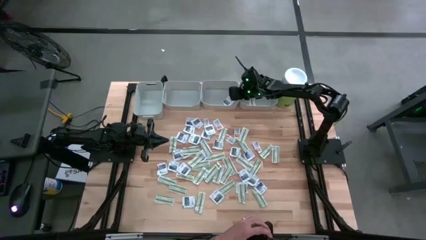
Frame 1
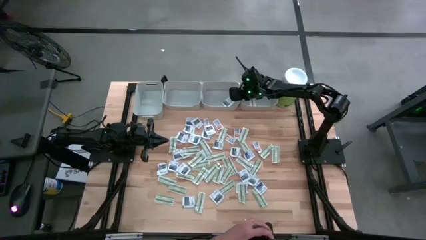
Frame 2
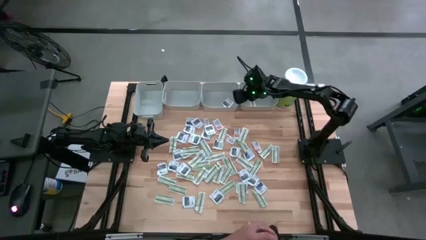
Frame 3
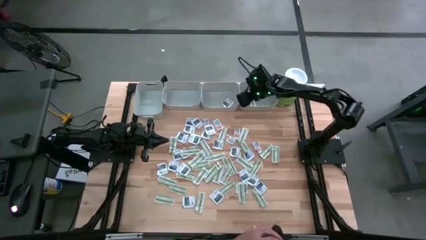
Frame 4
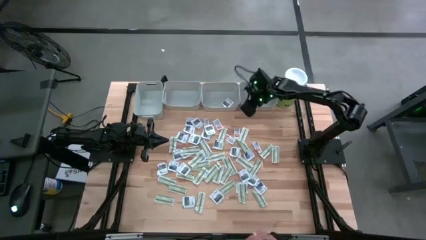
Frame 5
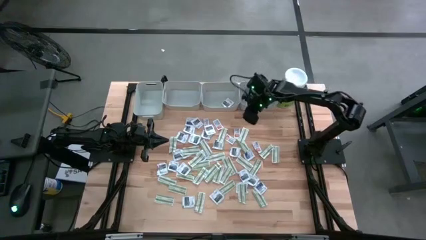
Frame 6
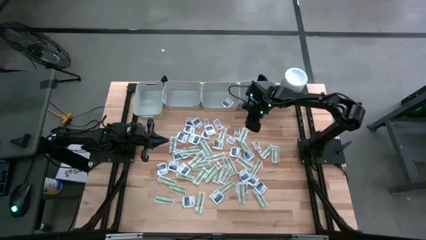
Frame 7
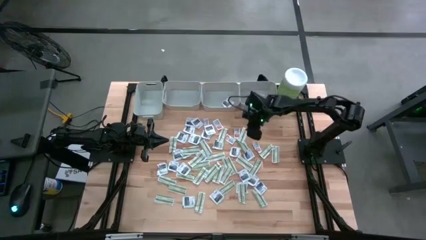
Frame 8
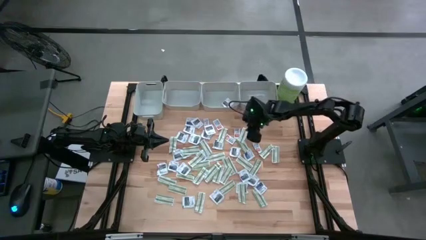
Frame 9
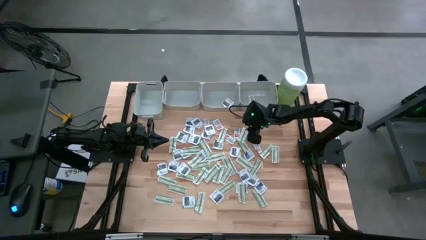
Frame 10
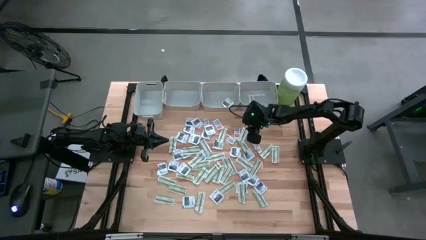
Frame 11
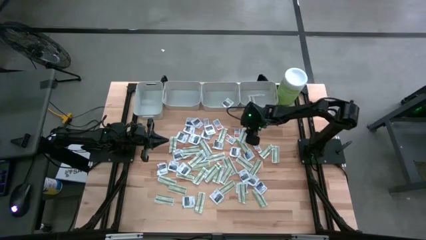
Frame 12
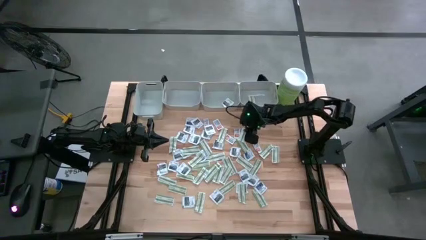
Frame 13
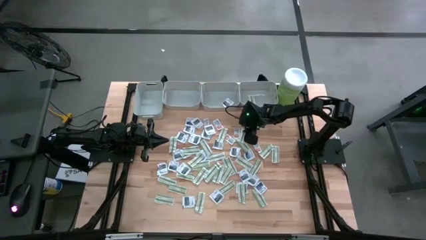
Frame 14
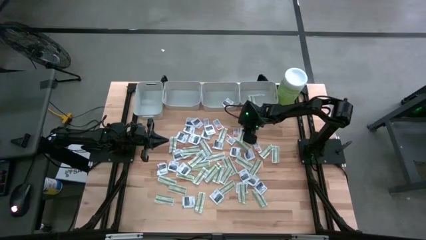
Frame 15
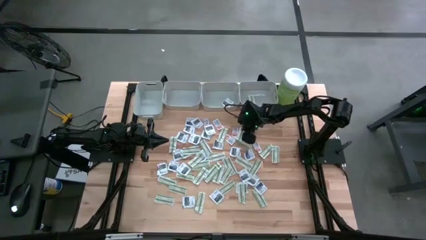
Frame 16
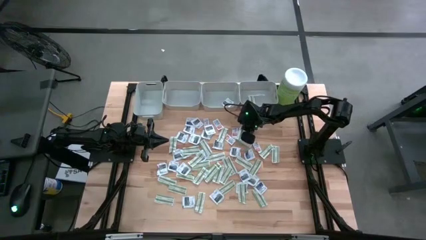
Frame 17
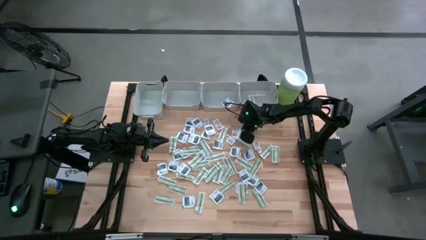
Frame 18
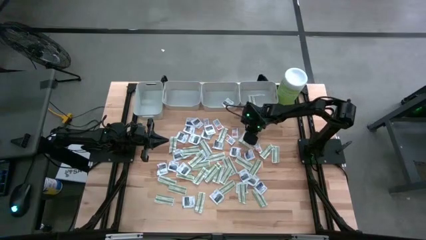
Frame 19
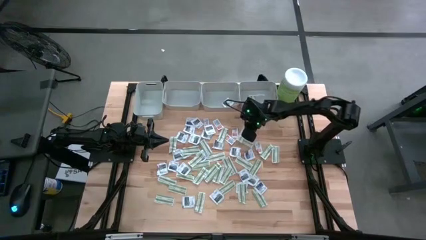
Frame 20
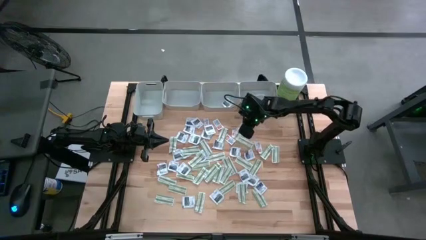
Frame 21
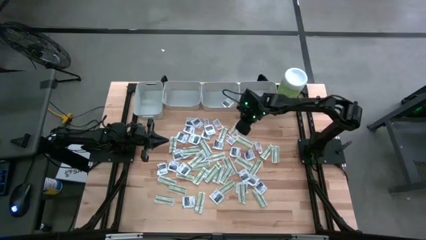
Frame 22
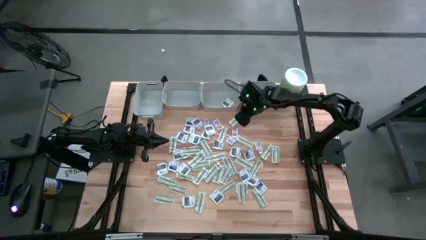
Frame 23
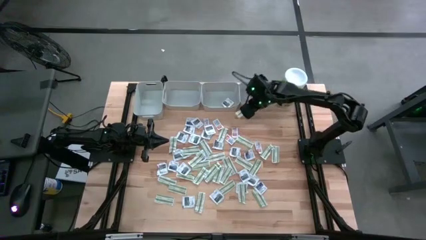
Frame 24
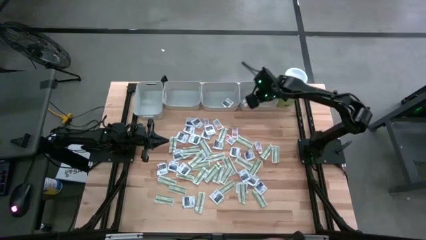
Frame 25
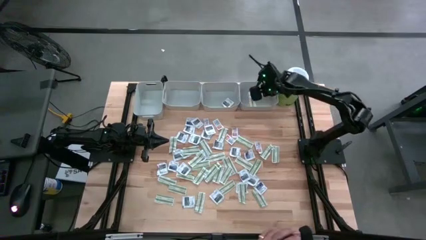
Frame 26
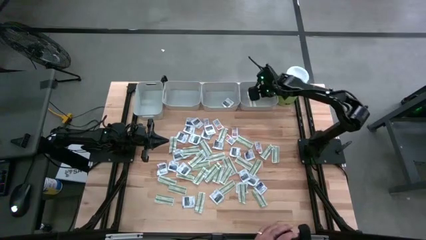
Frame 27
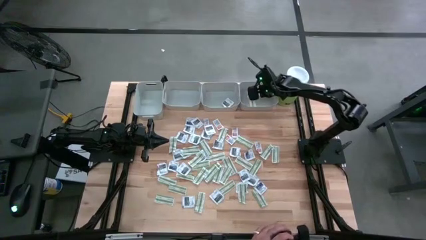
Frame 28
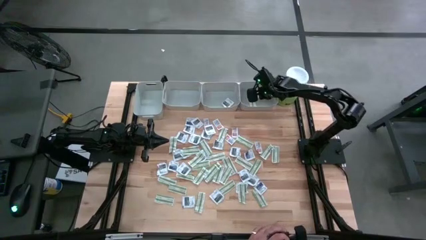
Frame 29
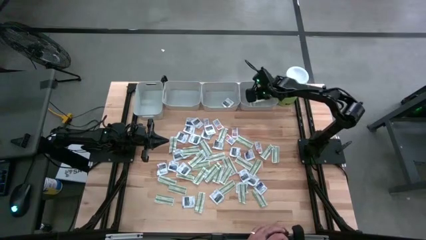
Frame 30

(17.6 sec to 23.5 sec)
Task: Pick & Place First Aid Supplies
Put the green bandage into the right gray bin

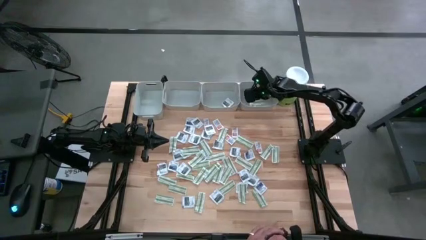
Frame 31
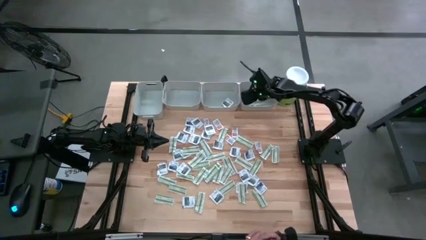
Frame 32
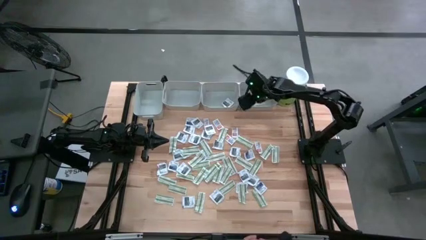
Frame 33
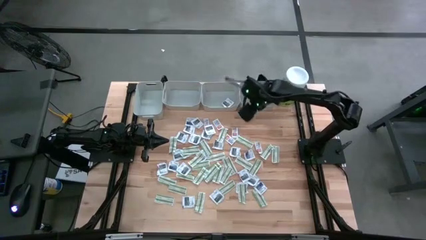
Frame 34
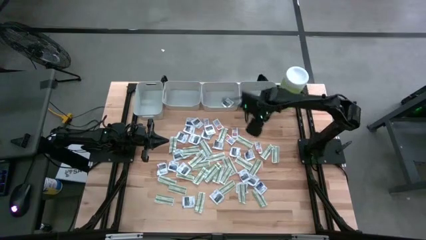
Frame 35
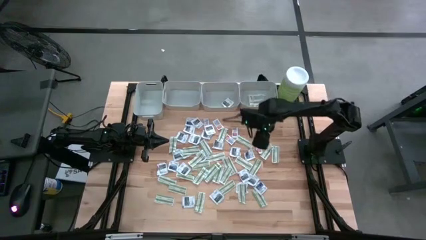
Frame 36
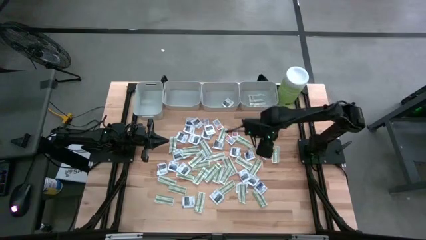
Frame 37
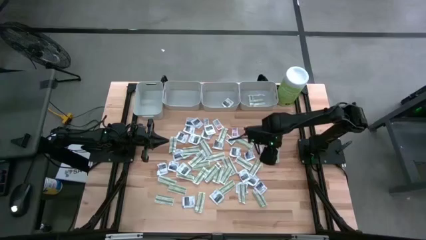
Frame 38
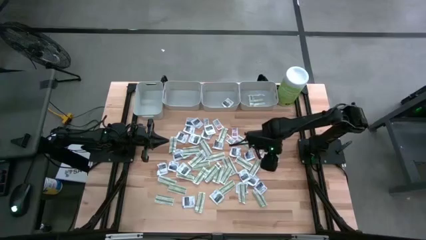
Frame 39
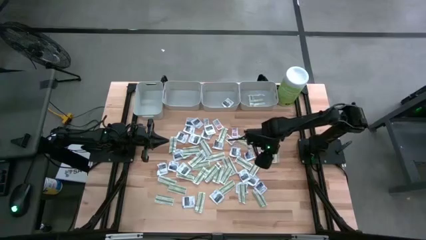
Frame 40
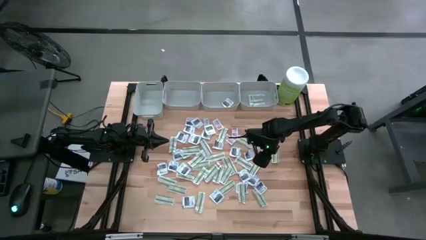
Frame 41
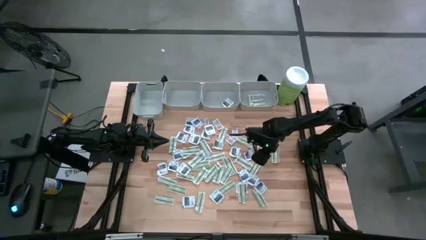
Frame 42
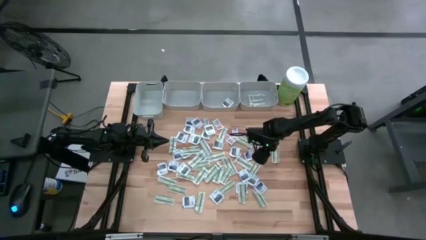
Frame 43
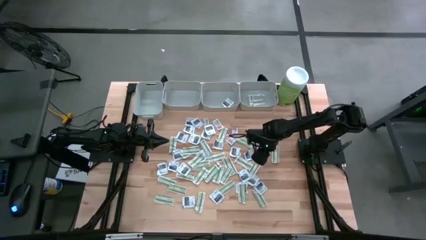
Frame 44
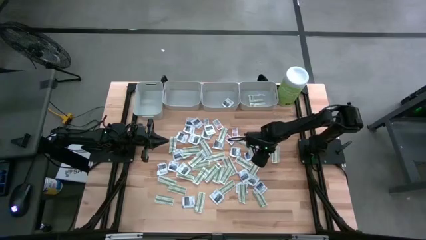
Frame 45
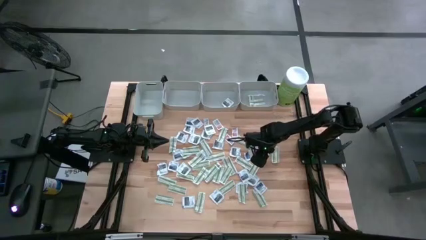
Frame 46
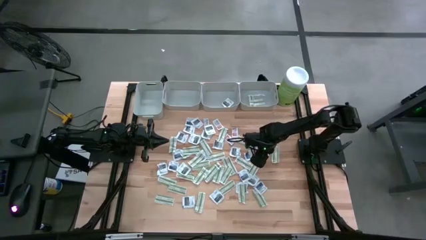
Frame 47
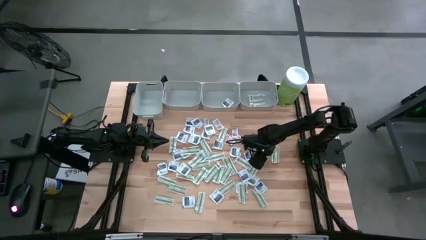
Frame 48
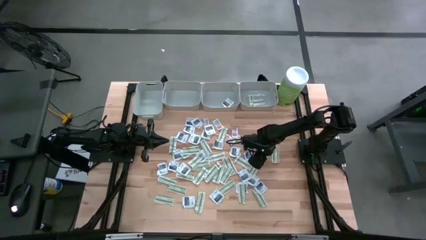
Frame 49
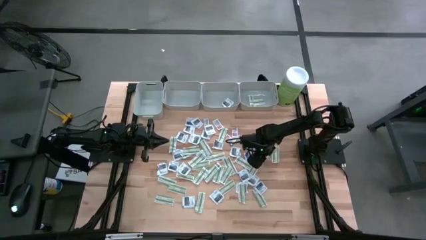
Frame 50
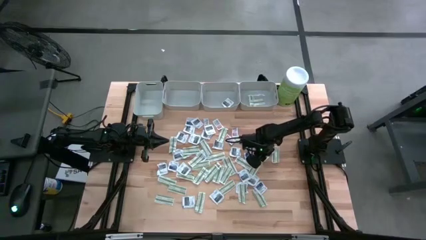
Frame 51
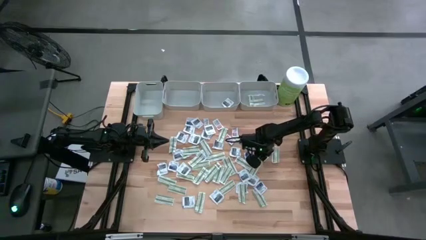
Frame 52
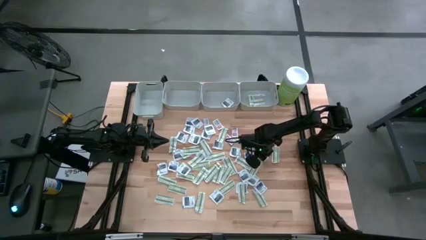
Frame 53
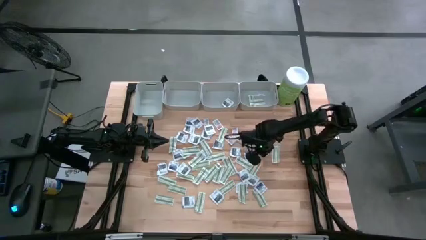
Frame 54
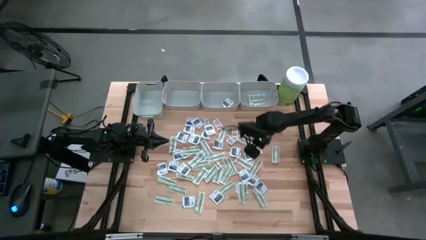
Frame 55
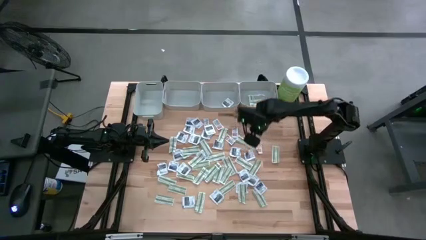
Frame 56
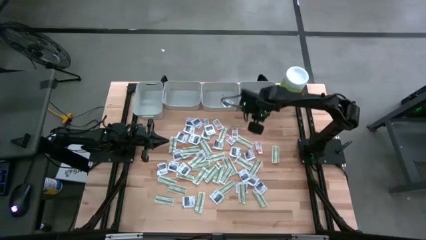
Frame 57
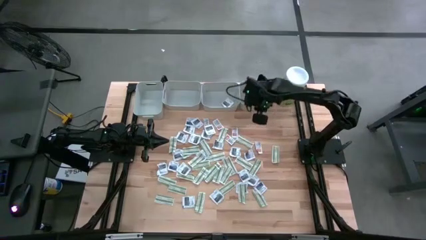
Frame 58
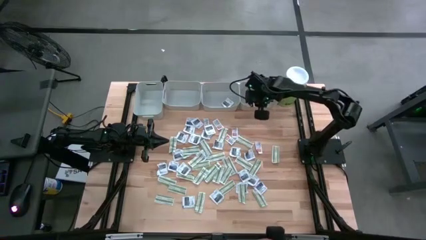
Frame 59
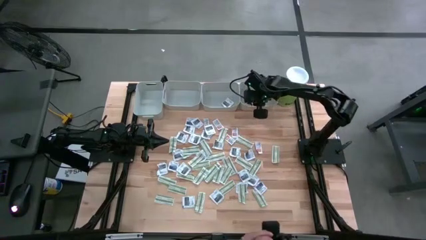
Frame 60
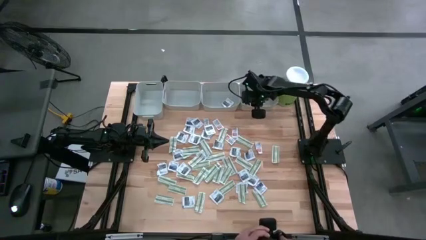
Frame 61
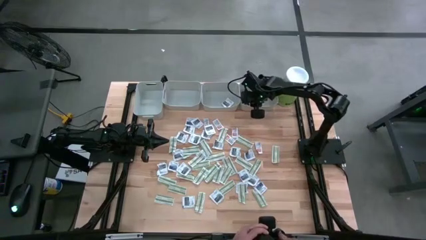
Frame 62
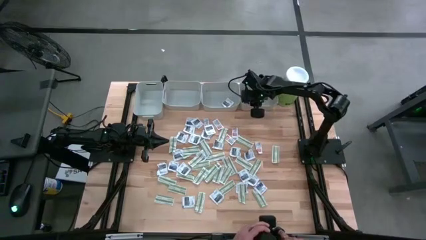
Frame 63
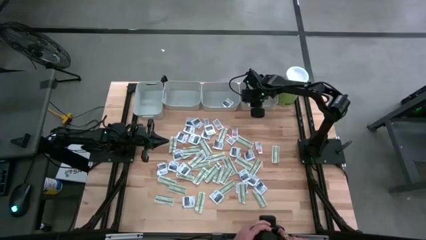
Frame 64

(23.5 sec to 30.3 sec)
Put the green bandage into the right gray bin

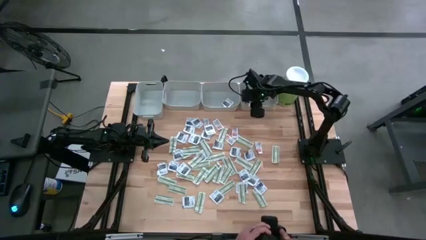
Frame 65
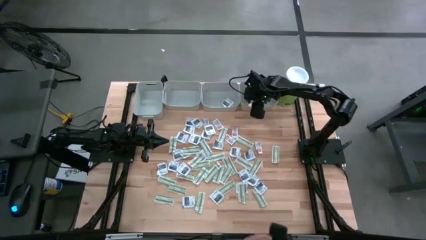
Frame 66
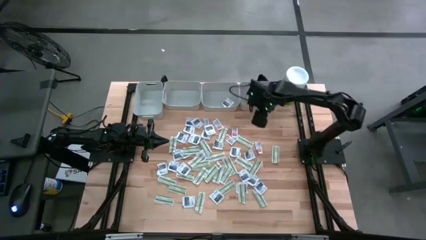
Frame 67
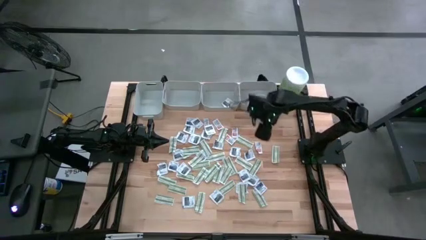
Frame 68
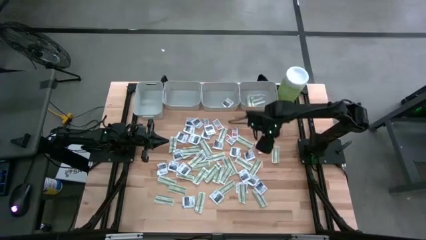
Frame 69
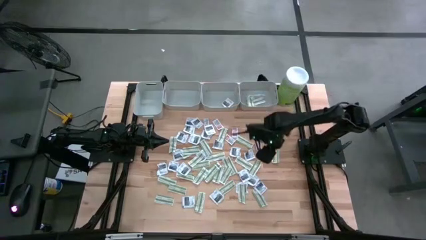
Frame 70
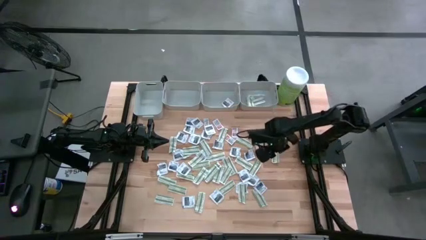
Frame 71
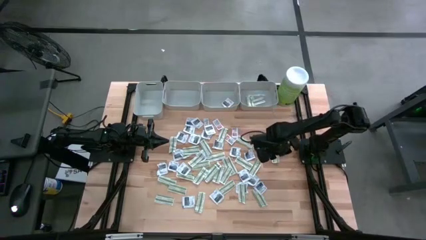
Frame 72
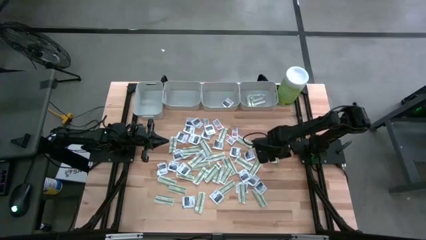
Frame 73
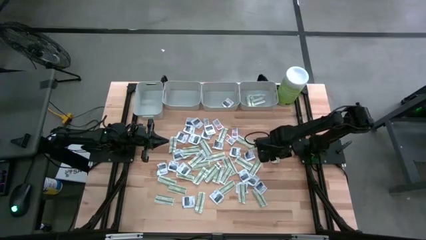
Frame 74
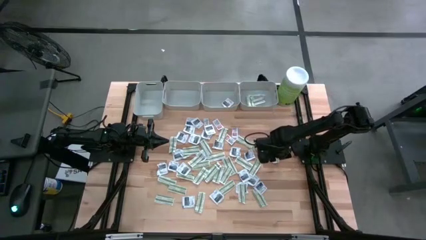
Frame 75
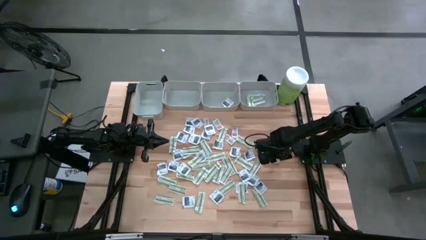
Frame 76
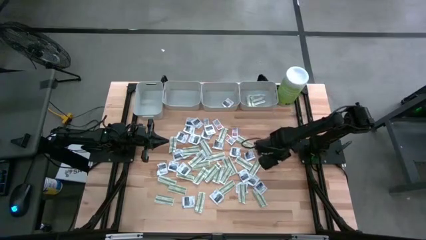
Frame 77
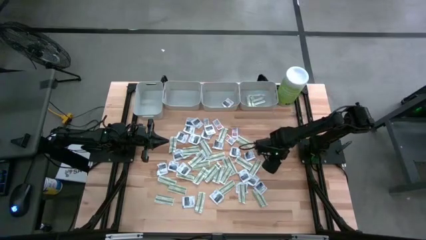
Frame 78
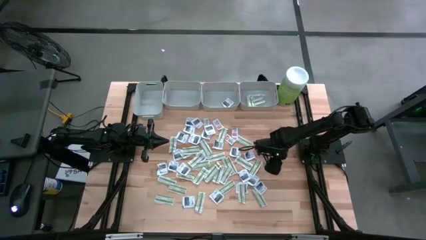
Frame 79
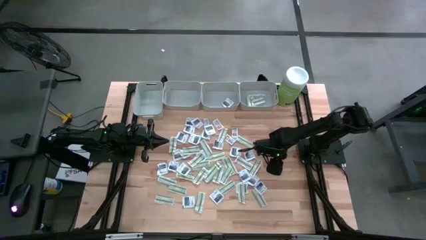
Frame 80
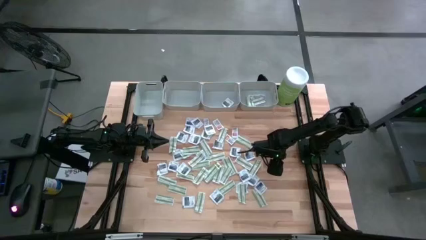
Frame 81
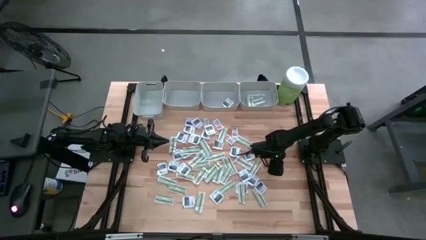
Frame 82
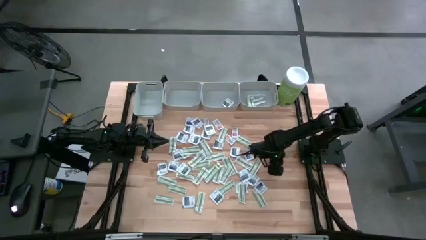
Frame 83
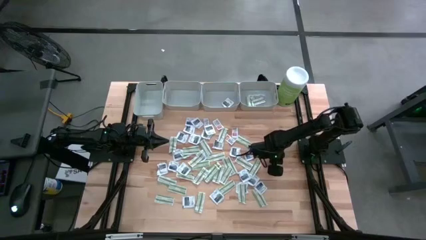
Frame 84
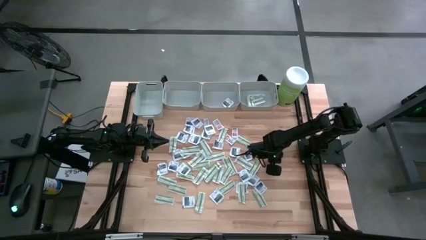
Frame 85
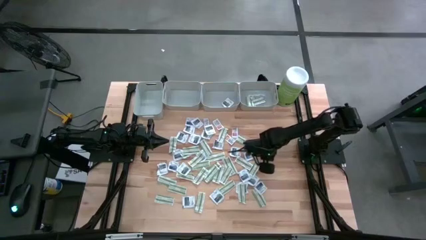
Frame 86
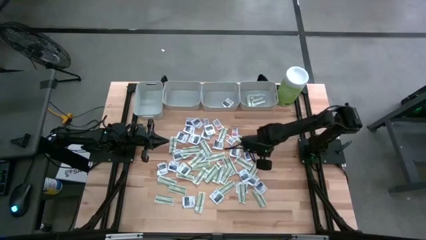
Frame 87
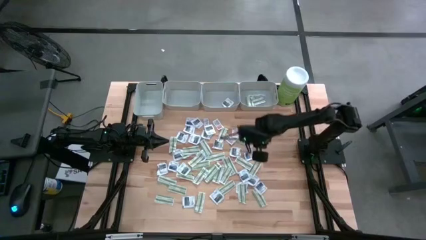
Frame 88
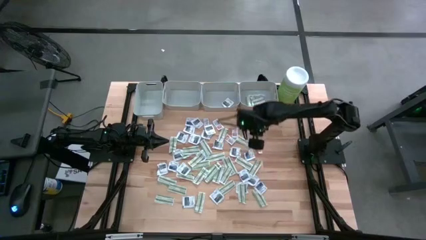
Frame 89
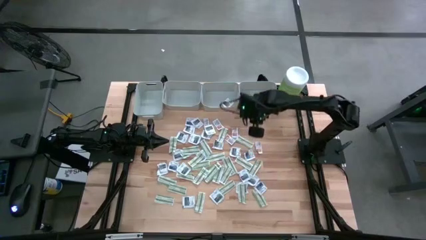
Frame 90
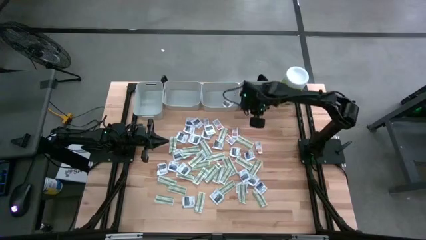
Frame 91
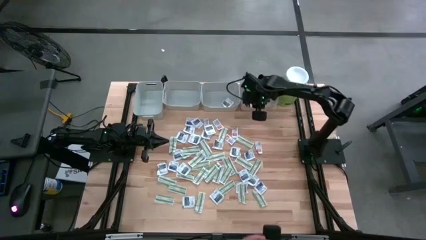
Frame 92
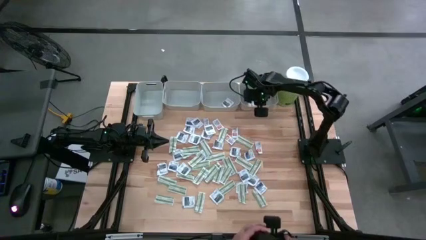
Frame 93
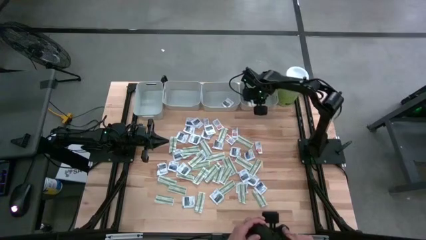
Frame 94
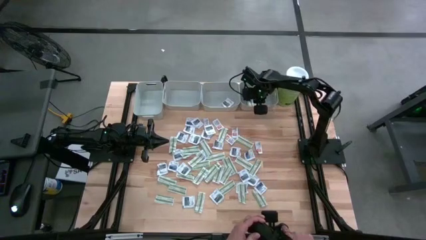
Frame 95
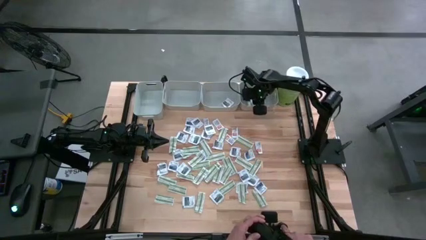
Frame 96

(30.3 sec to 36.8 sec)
Put the green bandage into the right gray bin
